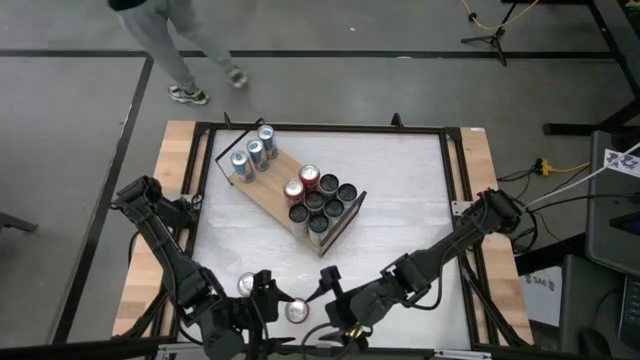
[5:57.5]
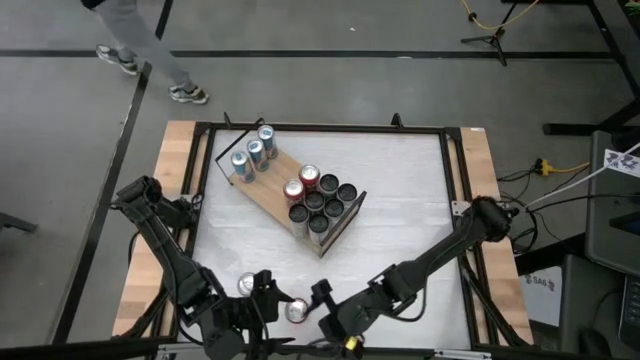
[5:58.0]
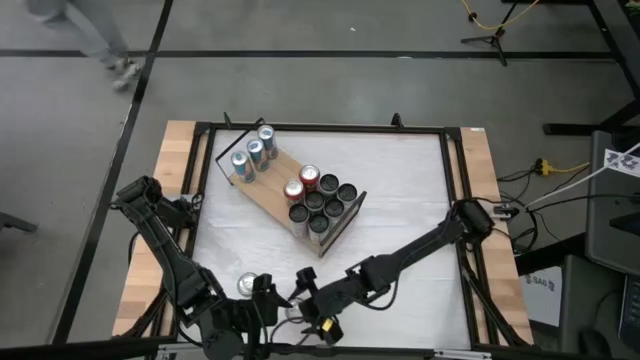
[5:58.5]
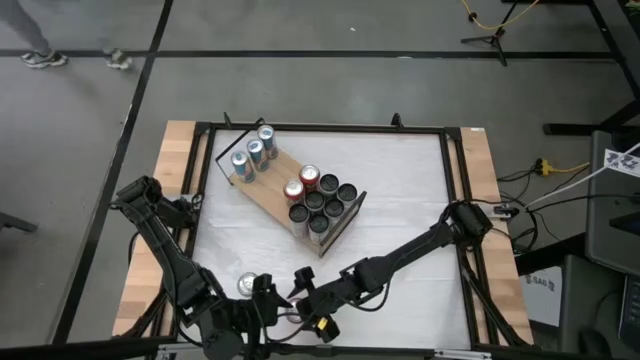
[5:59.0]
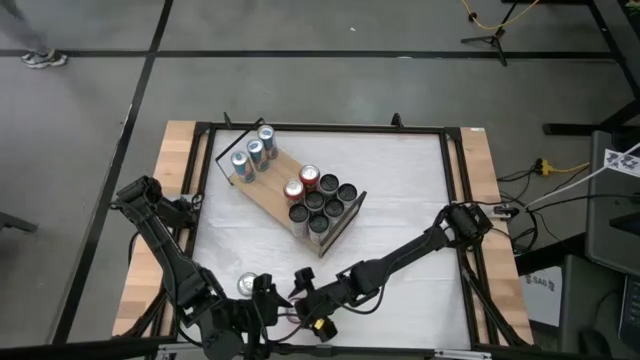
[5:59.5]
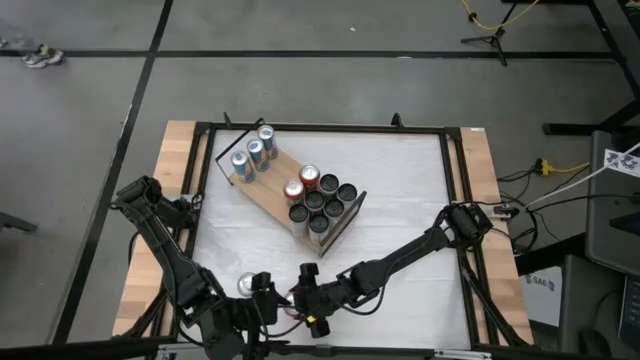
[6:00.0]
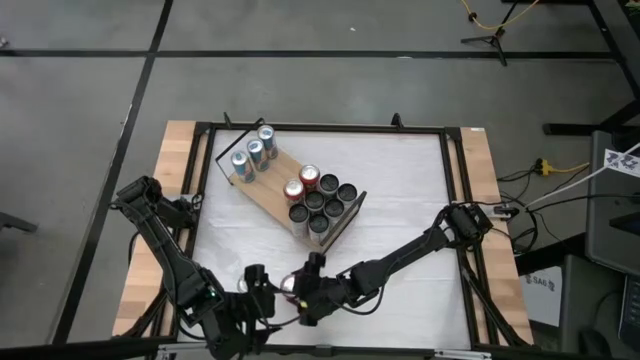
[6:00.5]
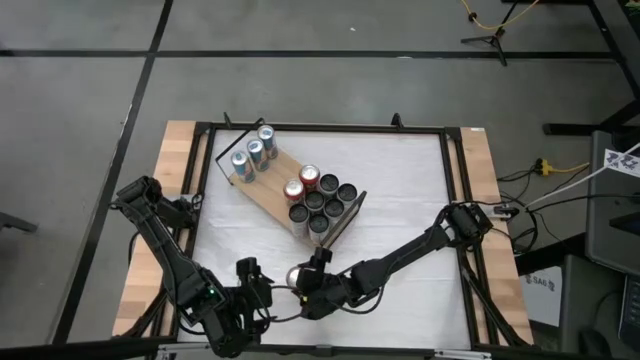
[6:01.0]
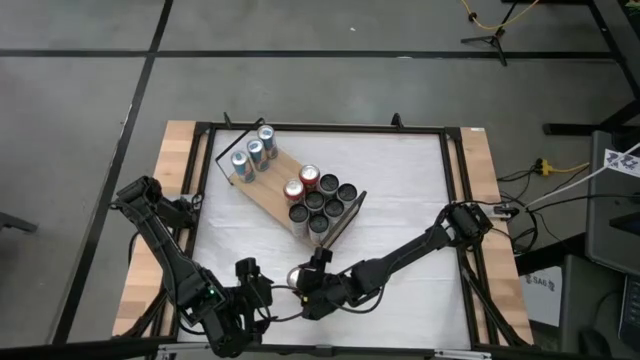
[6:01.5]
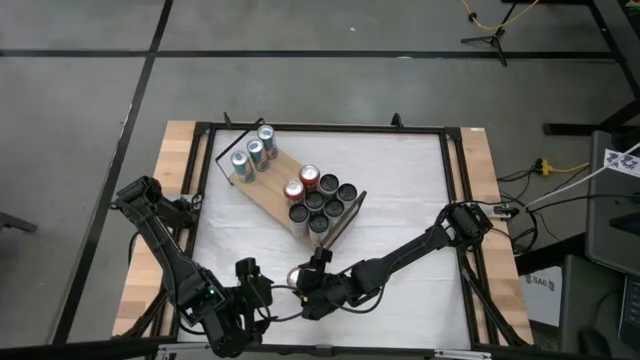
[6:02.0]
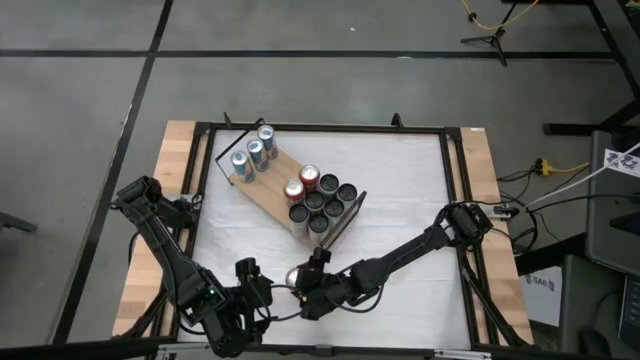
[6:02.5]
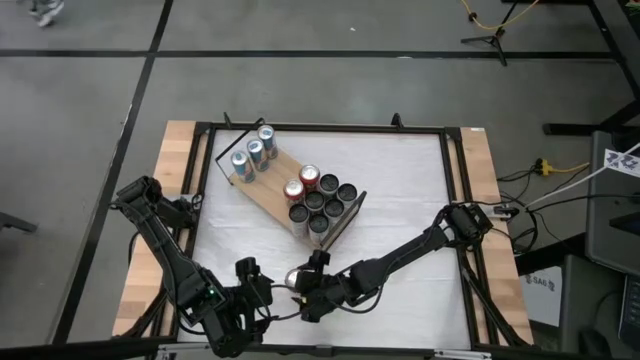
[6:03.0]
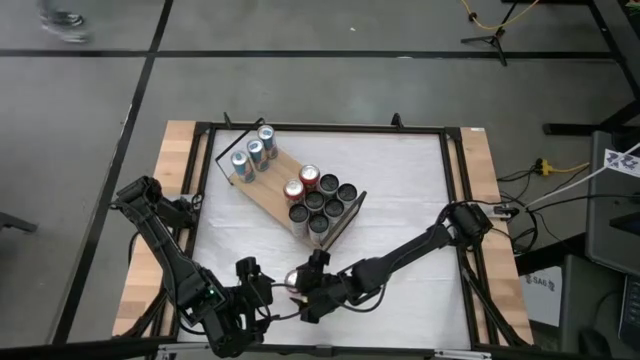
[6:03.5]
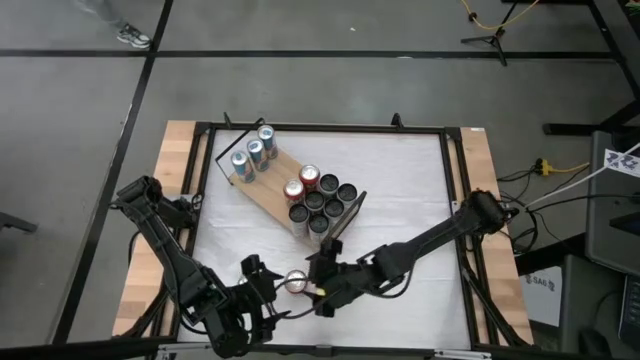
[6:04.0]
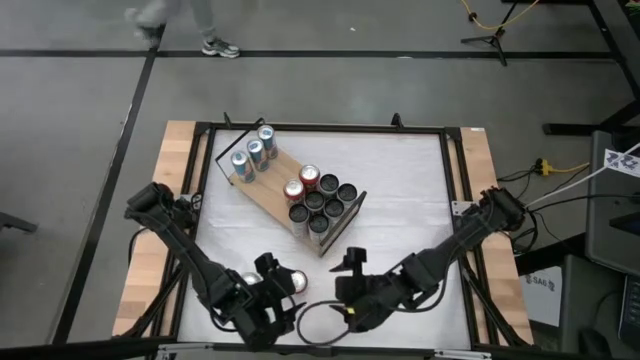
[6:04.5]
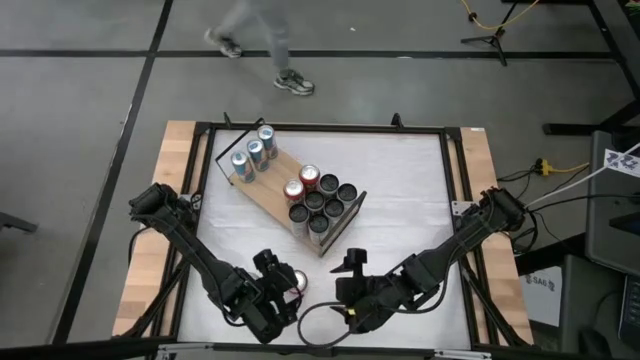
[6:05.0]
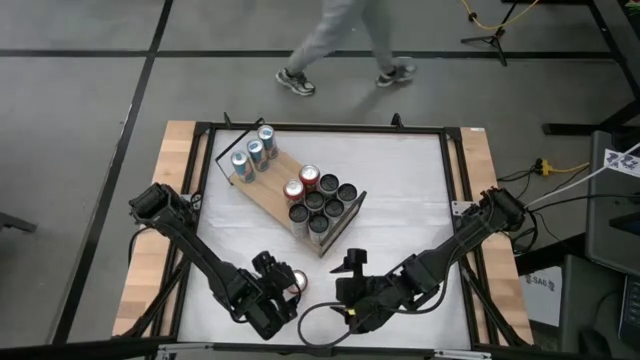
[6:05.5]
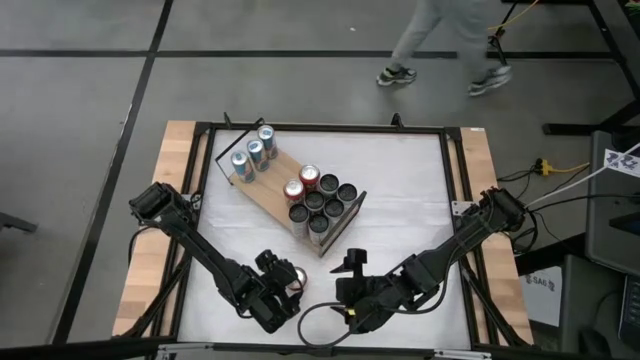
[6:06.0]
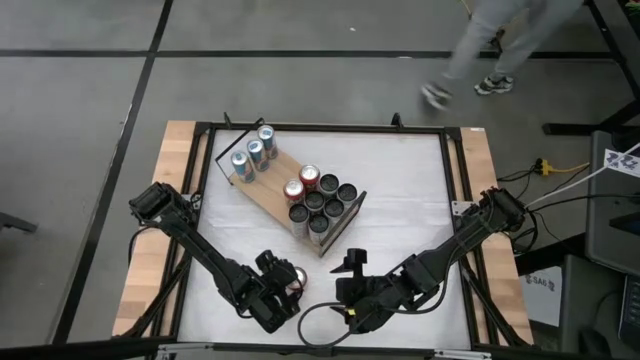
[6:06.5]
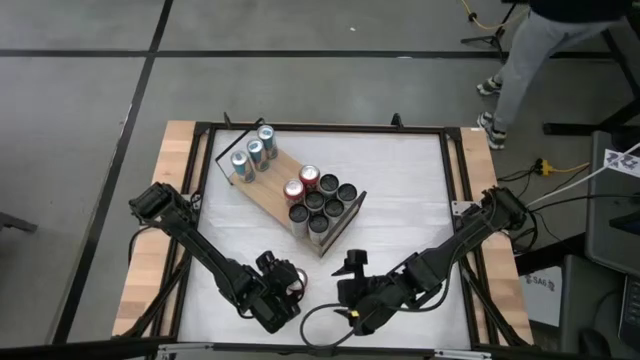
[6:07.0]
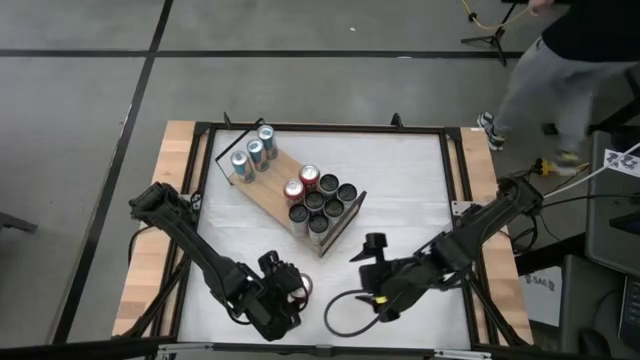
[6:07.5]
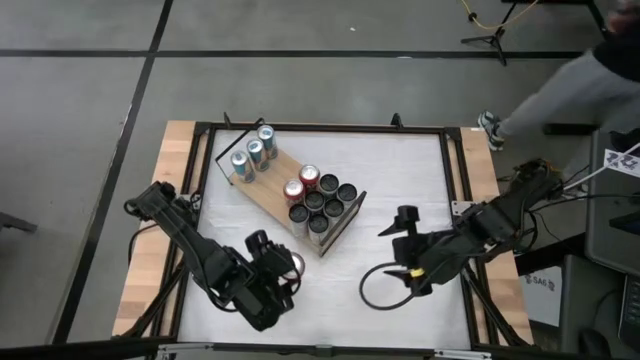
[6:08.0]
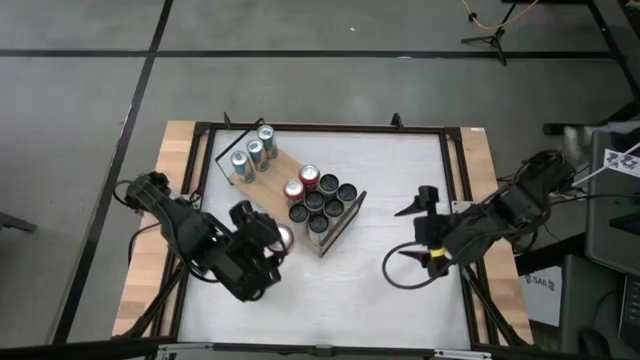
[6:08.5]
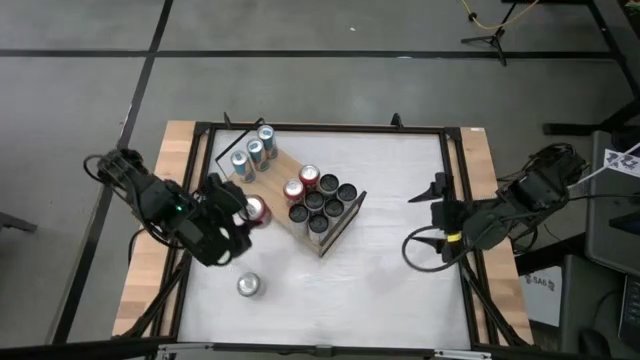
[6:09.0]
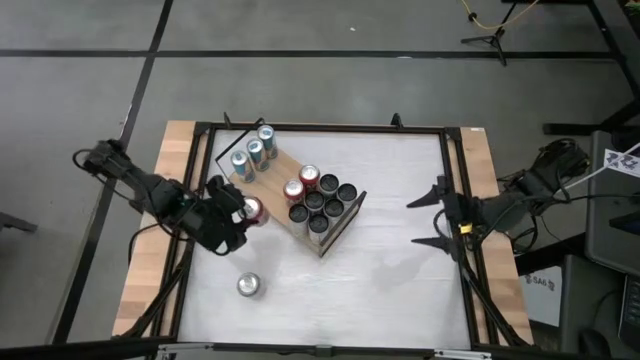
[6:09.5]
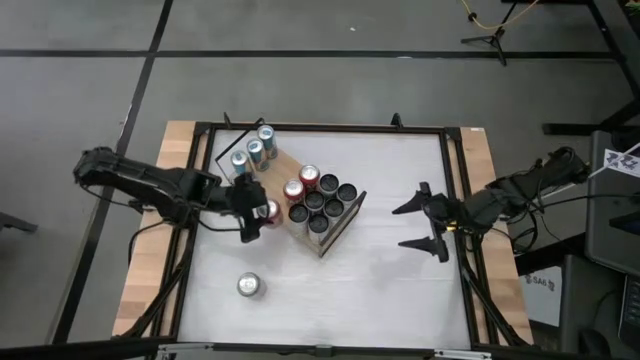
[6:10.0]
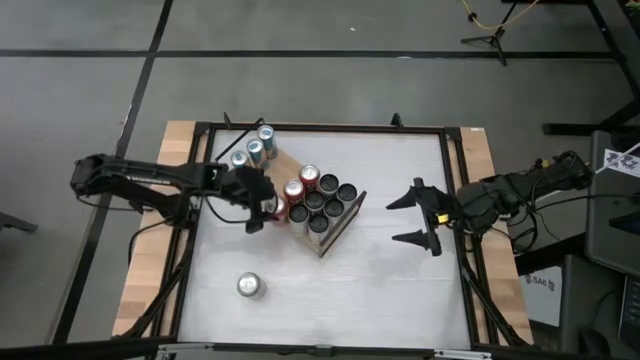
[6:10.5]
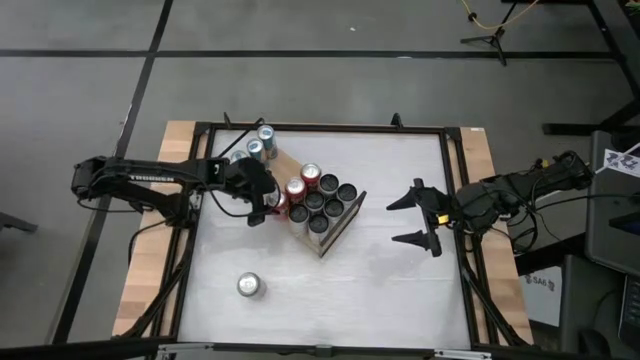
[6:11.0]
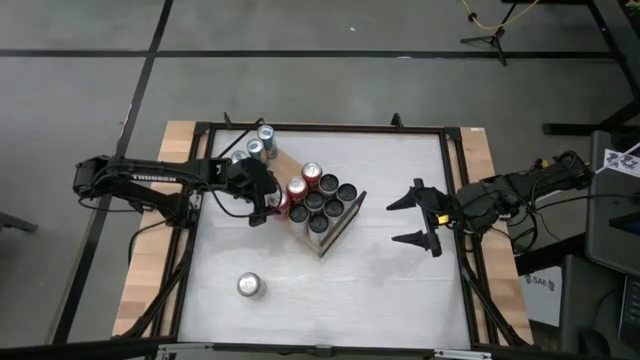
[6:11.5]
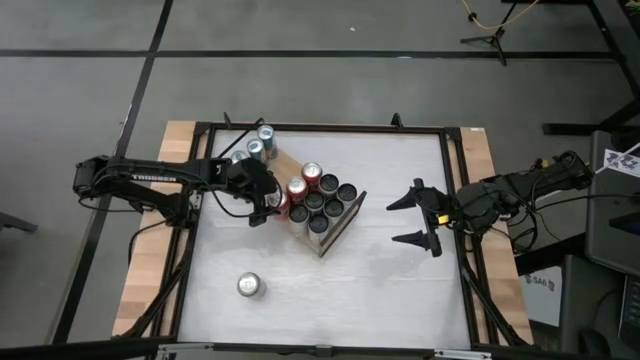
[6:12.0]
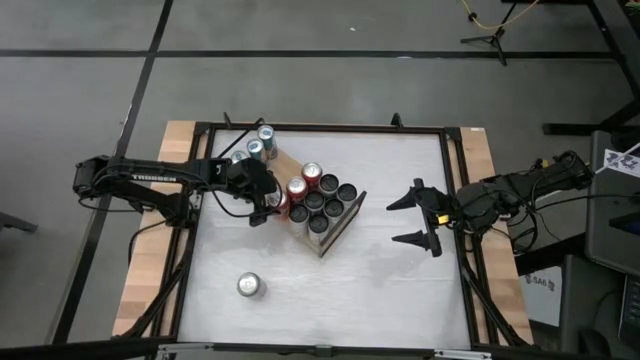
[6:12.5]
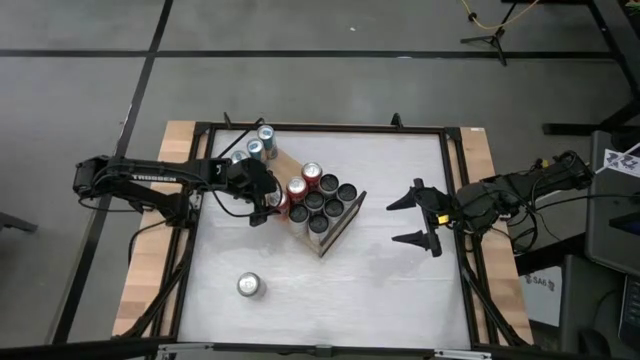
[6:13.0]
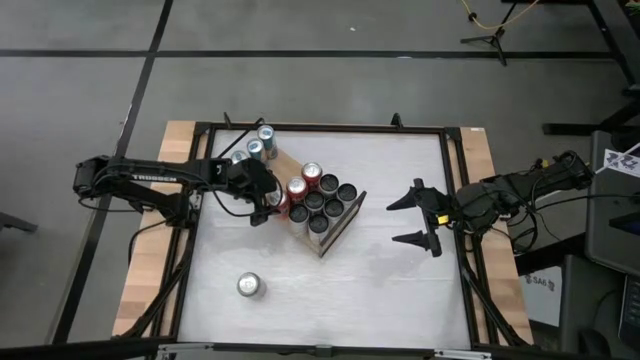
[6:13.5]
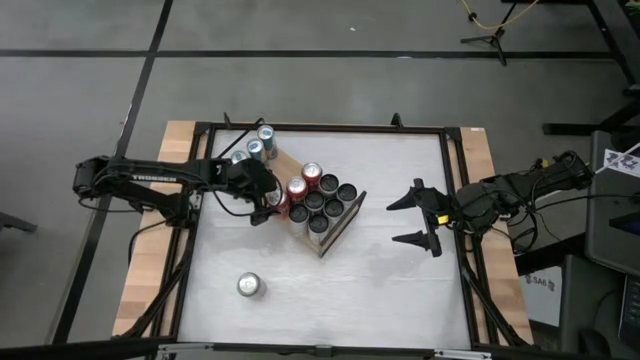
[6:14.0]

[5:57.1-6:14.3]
Task: Place canned beverage on shelf
Put the red soda can on the shelf aligned with the other red soda cans
